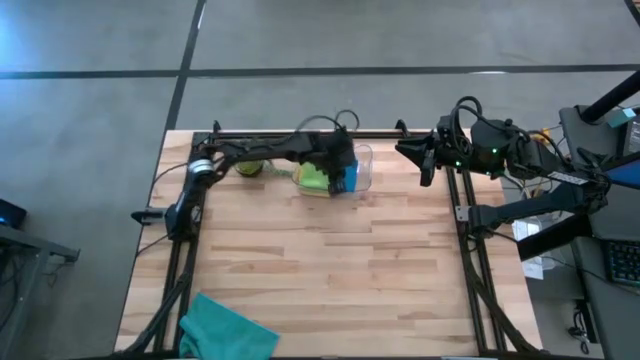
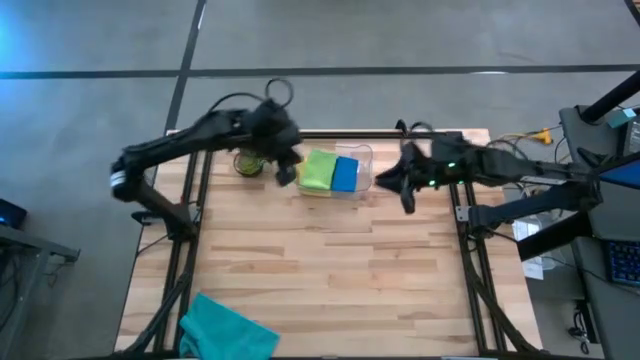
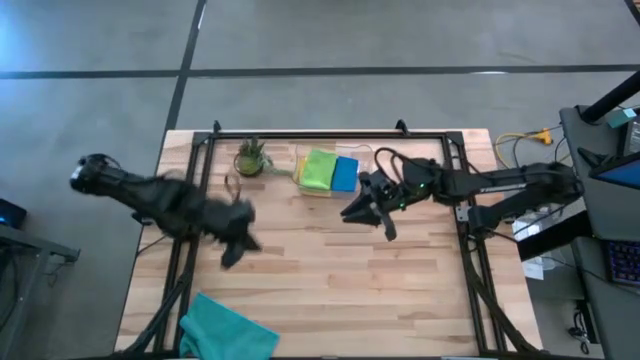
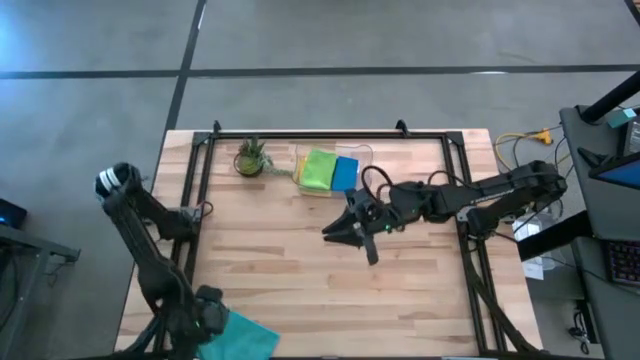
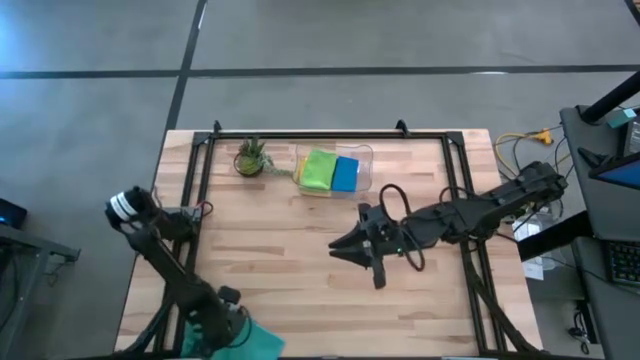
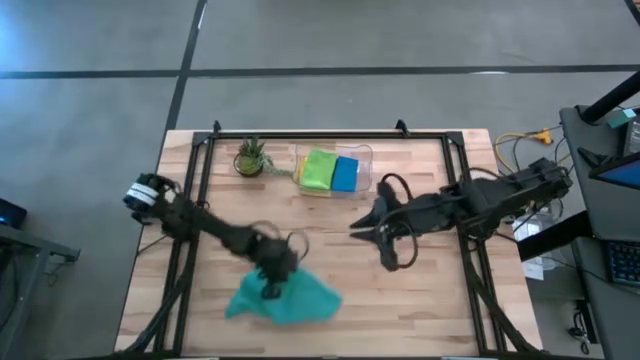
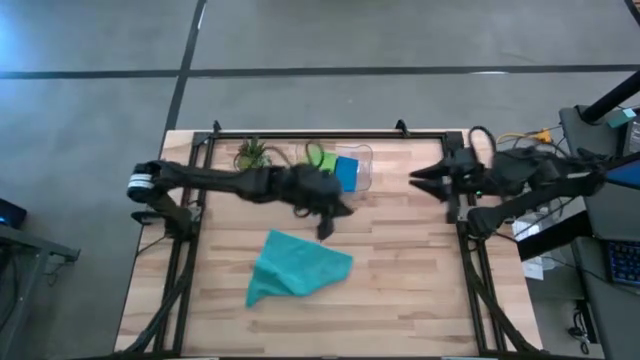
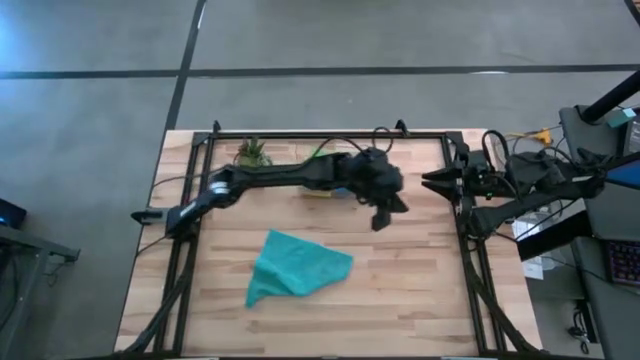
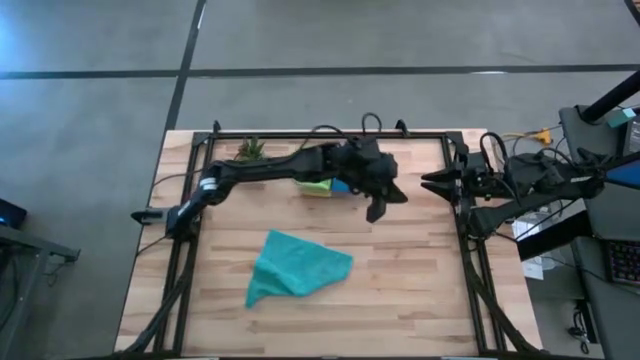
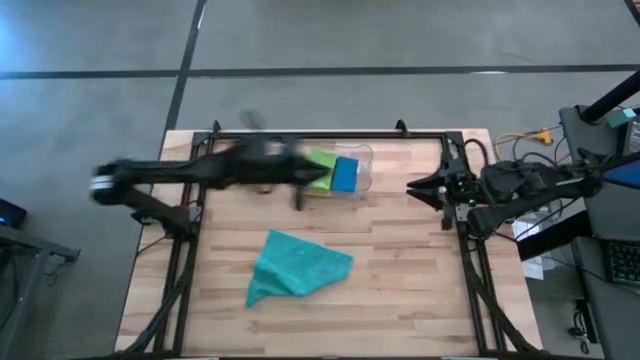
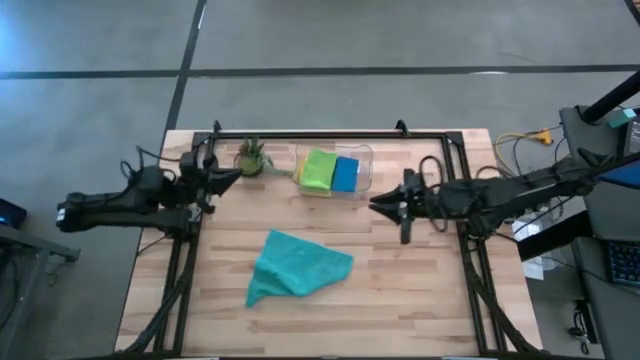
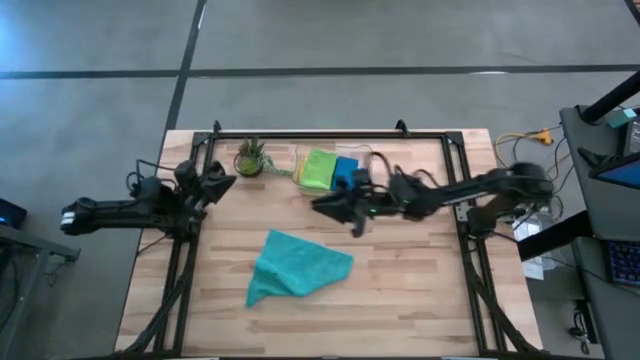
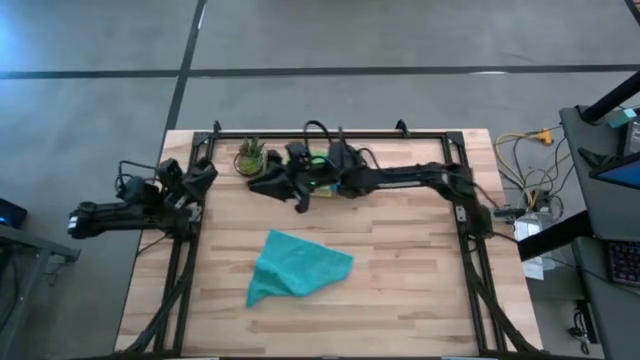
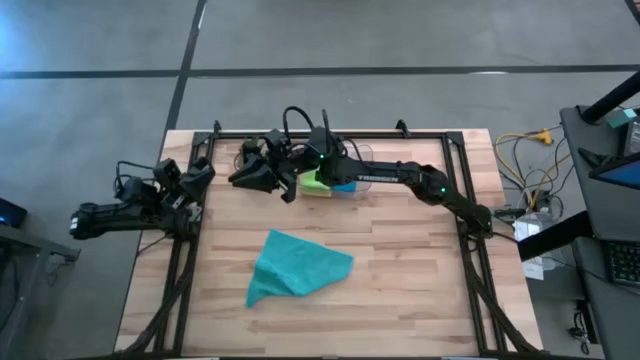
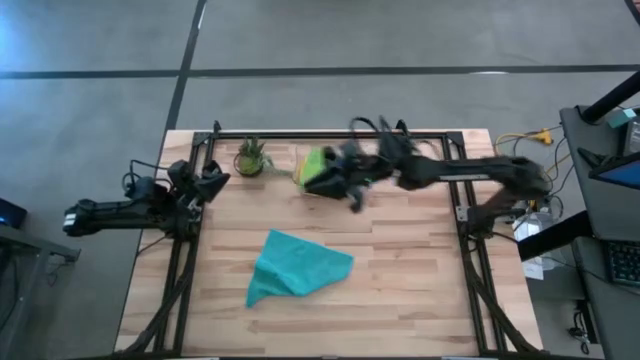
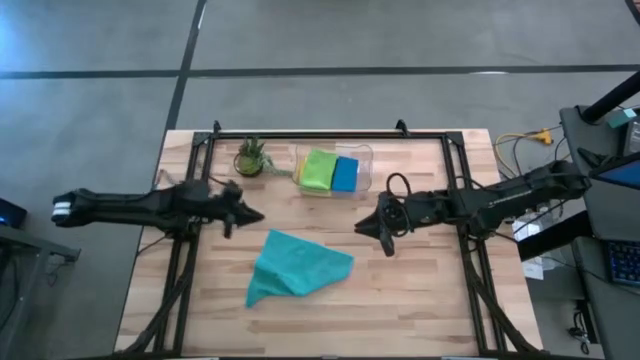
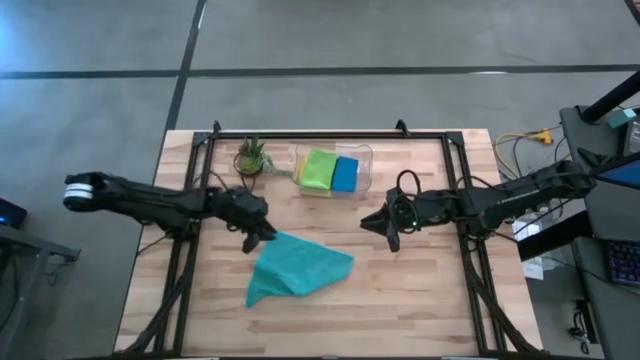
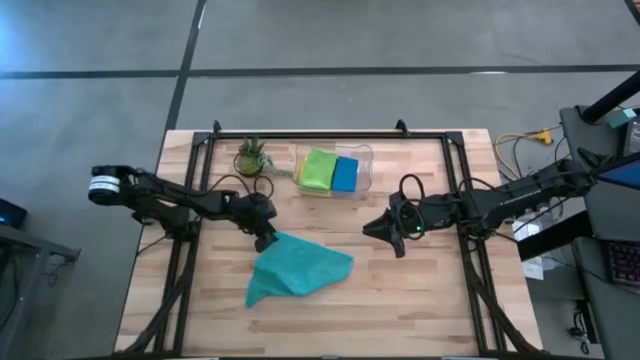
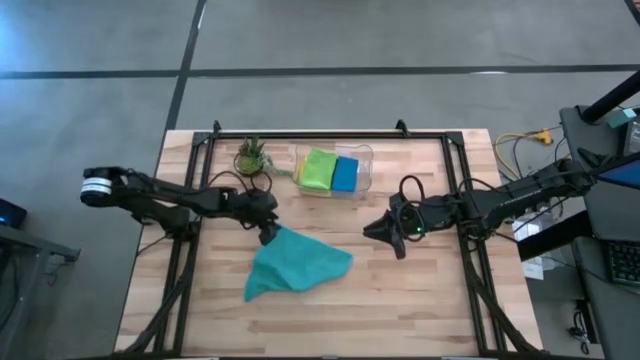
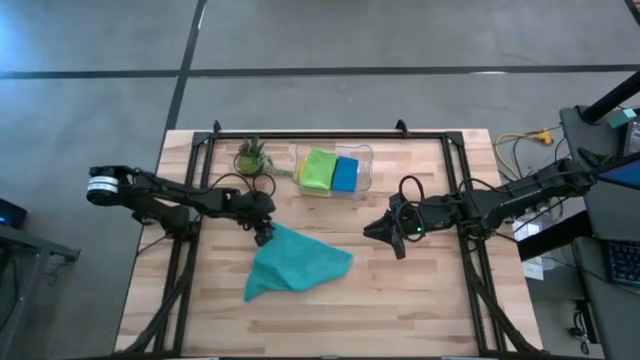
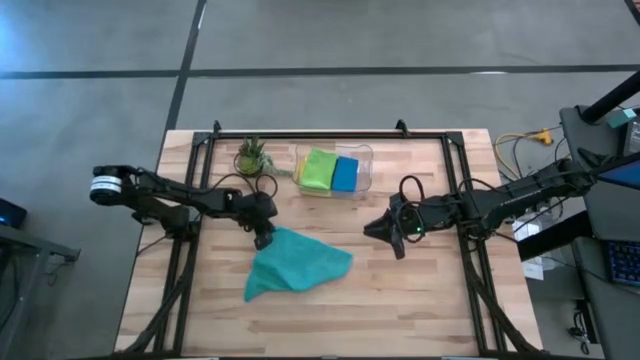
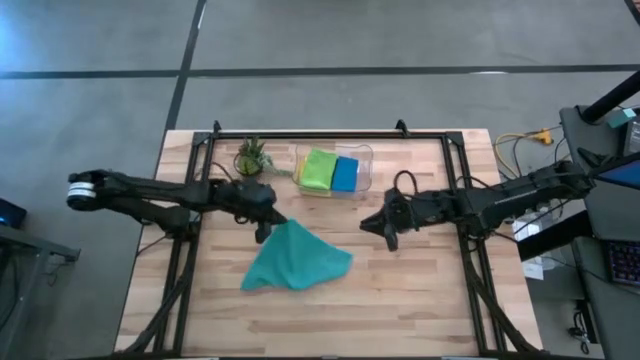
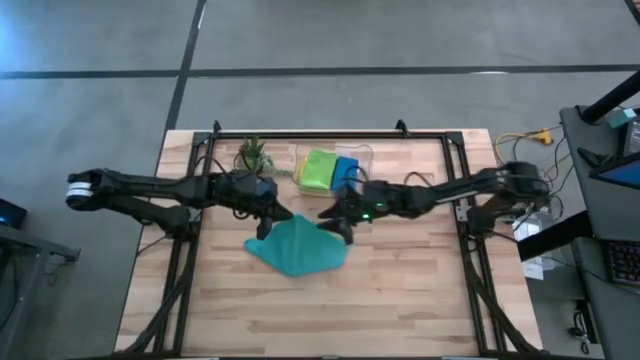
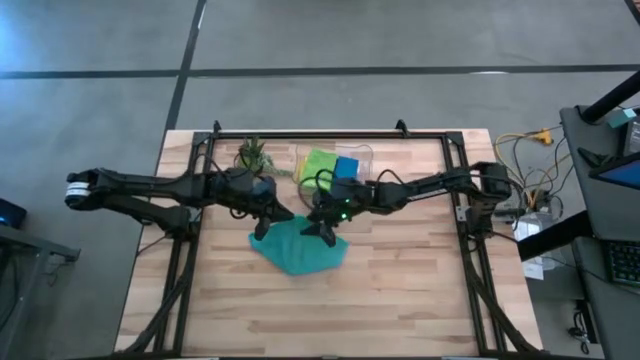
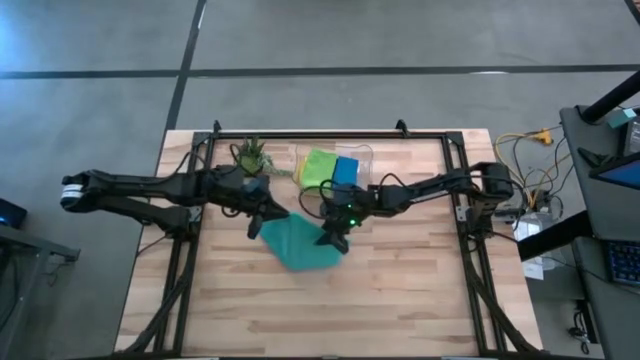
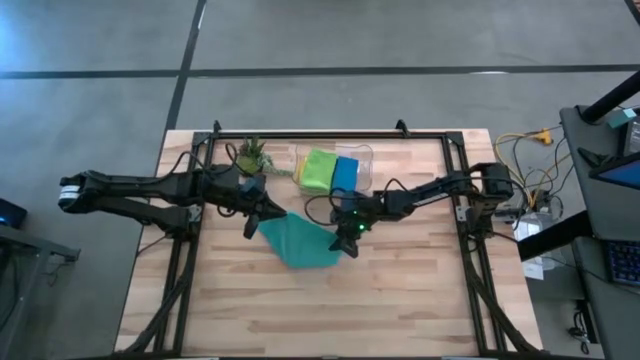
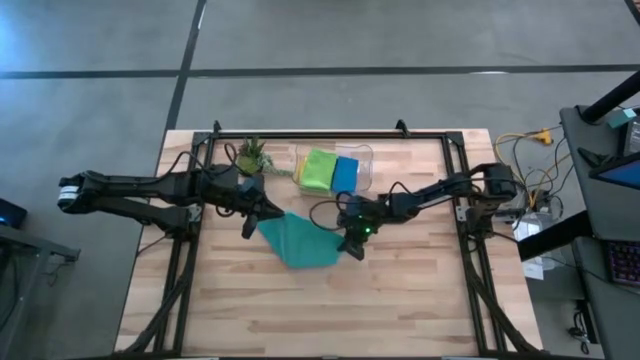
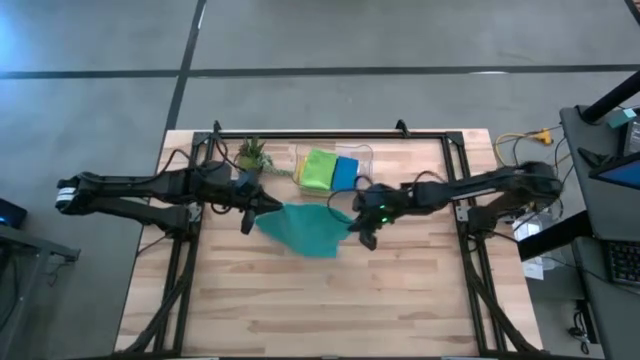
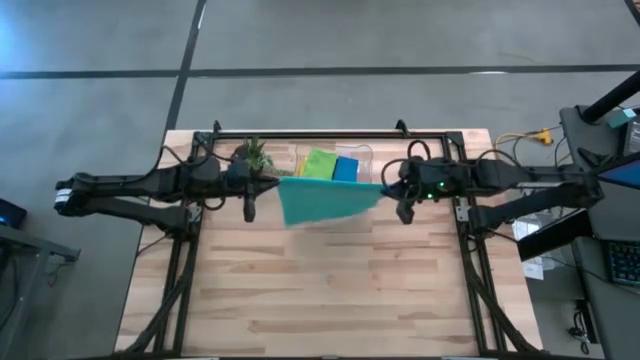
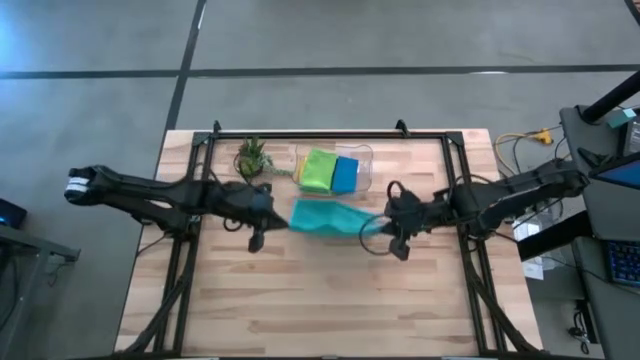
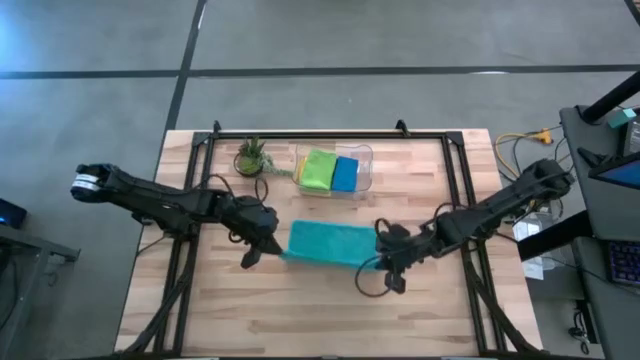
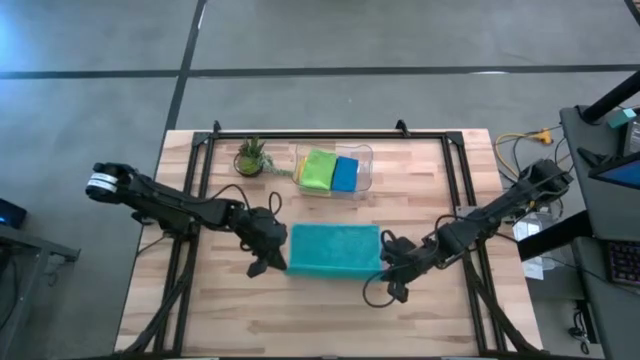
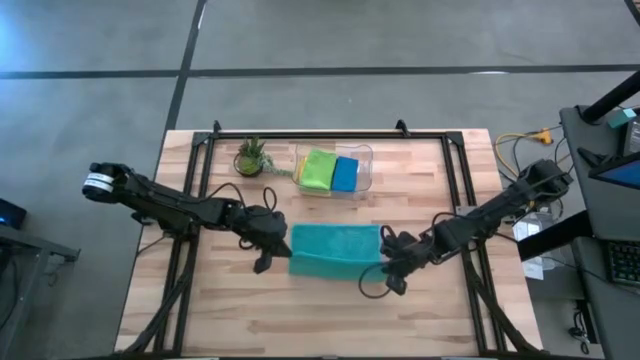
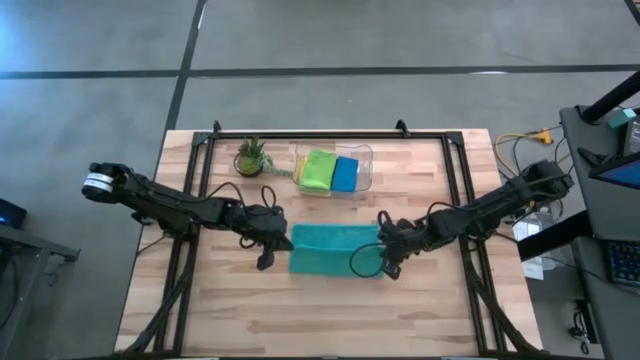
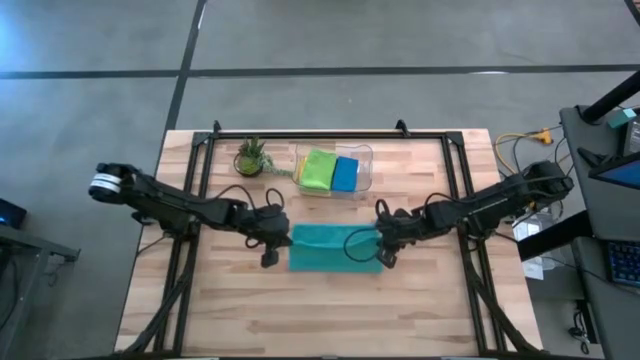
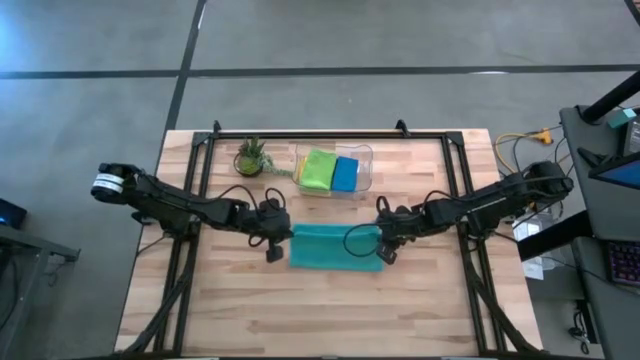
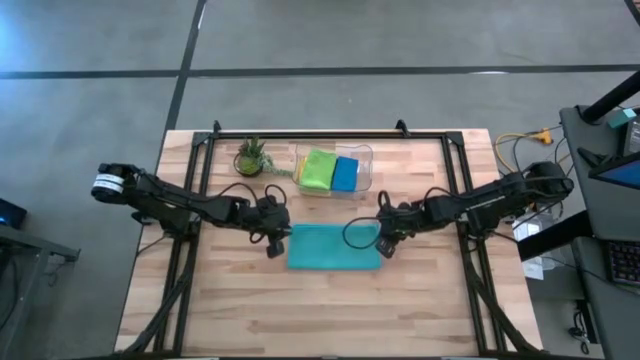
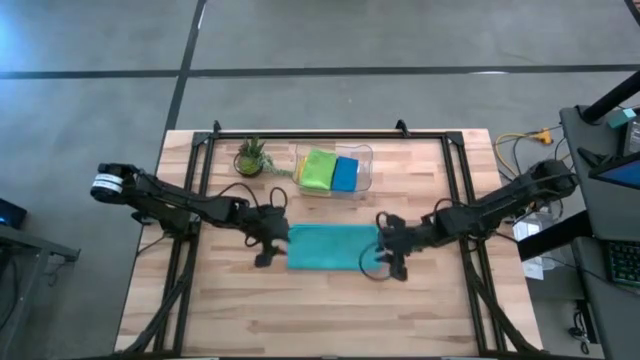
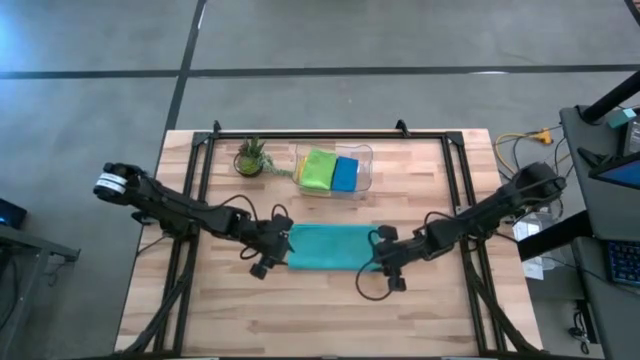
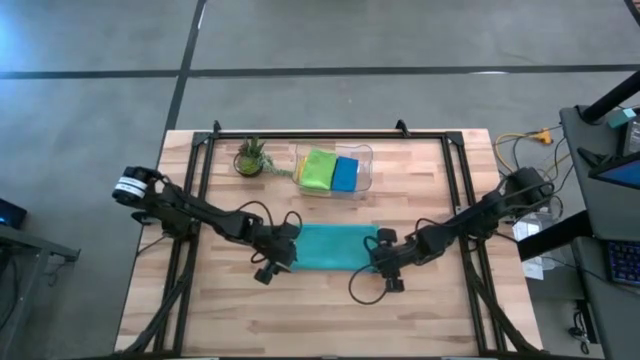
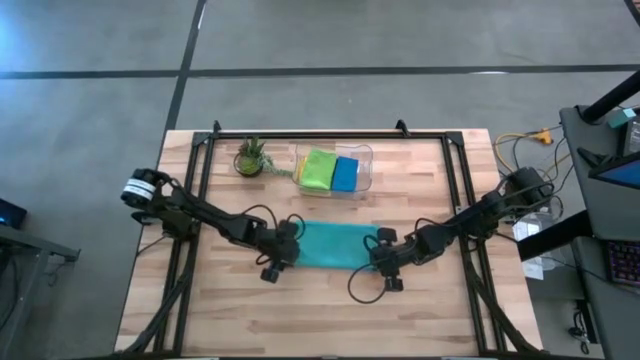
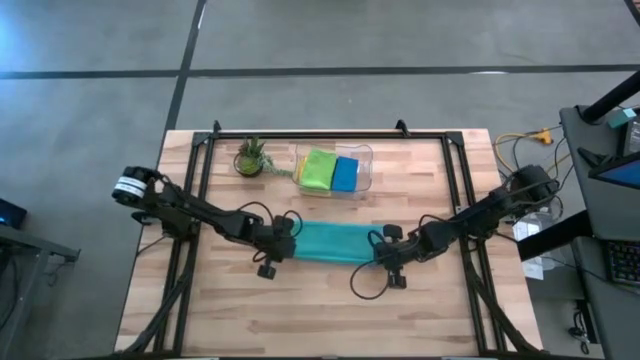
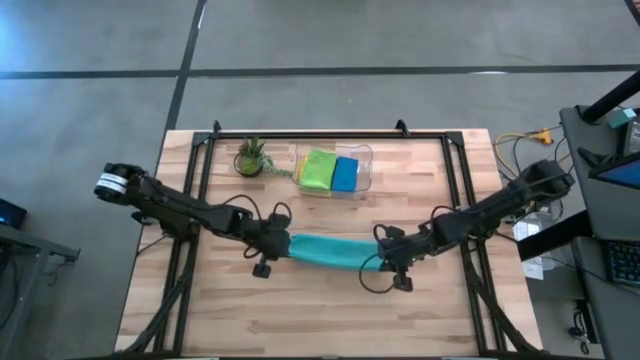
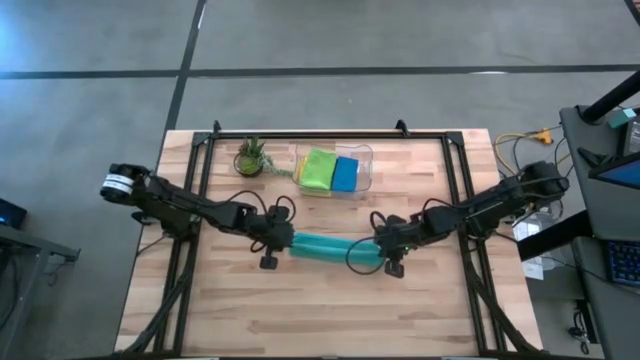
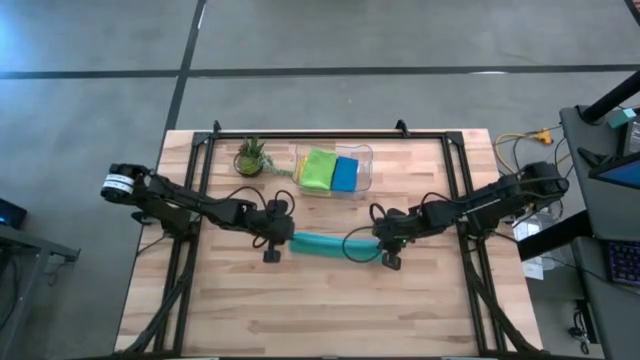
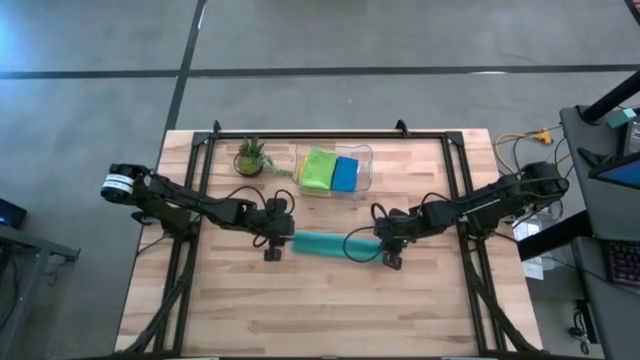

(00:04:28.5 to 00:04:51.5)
Task: Fold microfiber towels
Fold the light blue microfiber towel
